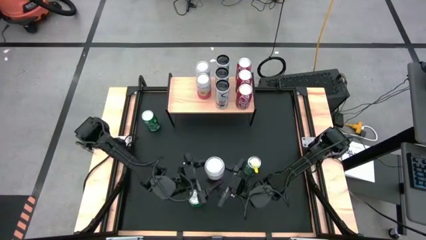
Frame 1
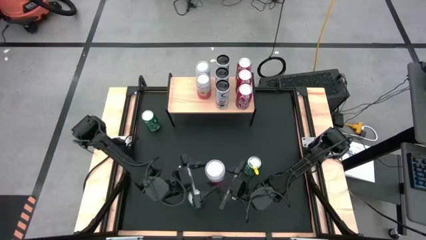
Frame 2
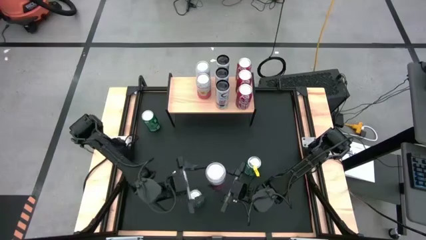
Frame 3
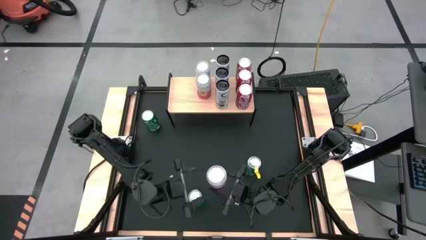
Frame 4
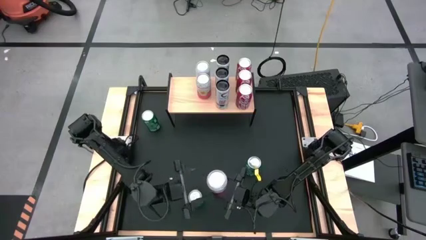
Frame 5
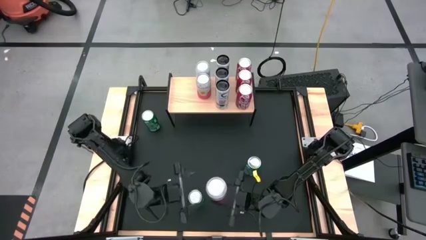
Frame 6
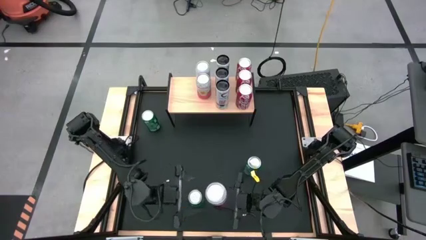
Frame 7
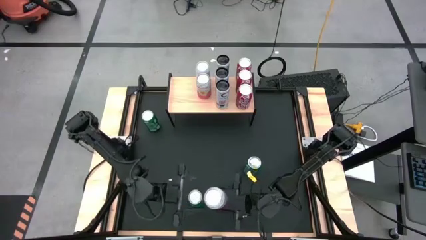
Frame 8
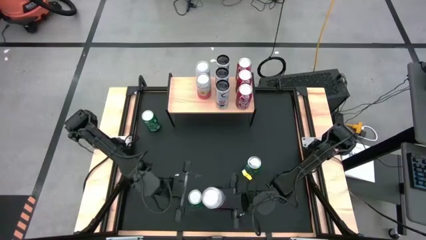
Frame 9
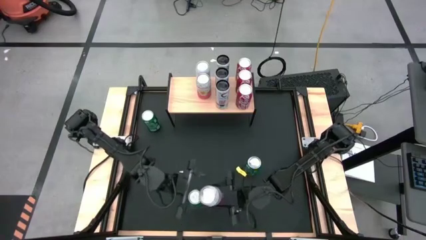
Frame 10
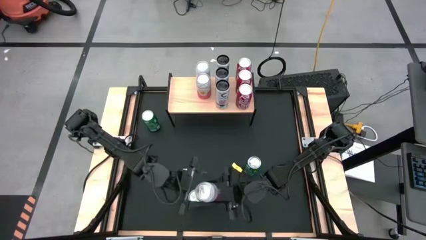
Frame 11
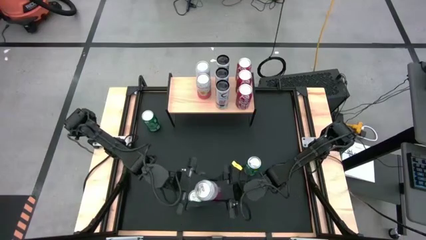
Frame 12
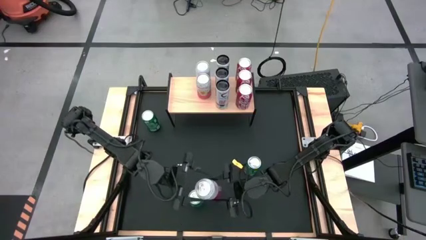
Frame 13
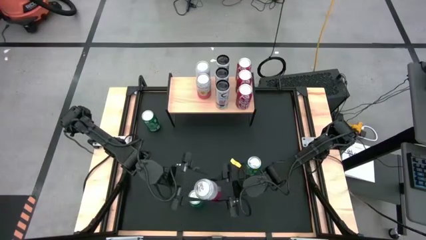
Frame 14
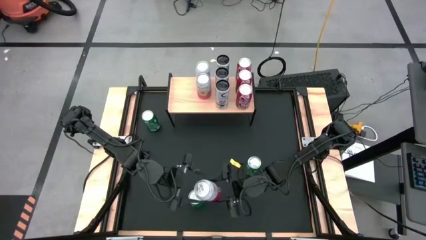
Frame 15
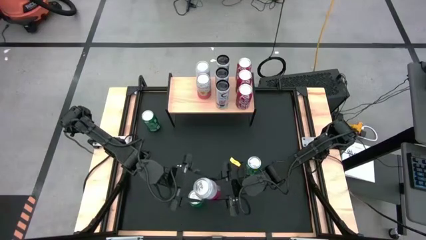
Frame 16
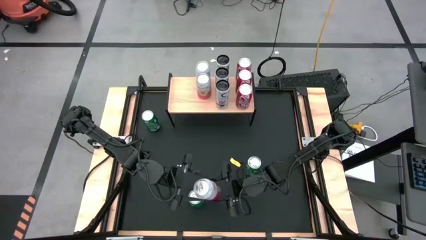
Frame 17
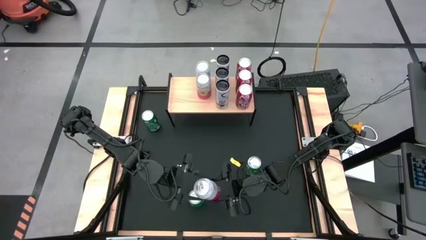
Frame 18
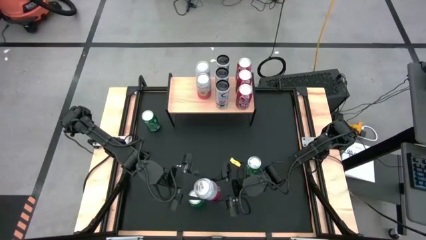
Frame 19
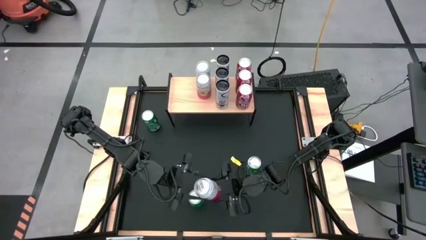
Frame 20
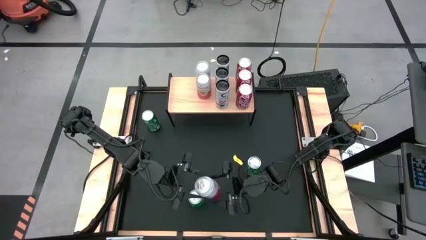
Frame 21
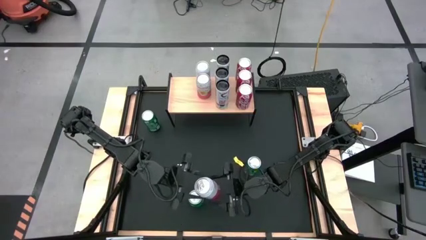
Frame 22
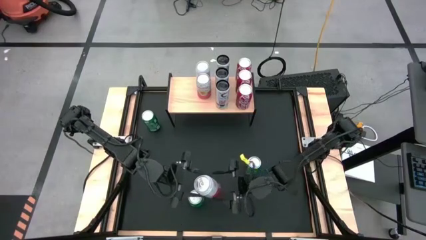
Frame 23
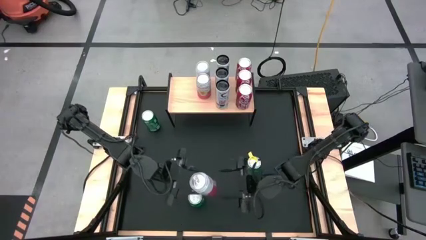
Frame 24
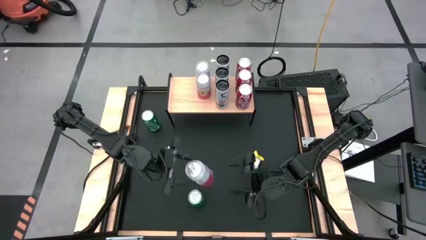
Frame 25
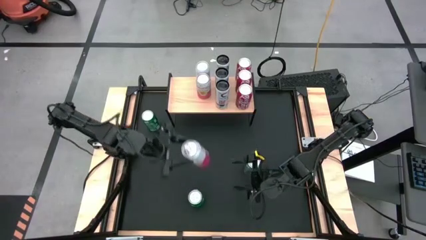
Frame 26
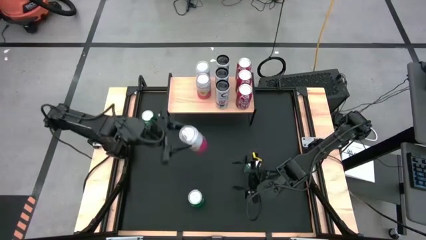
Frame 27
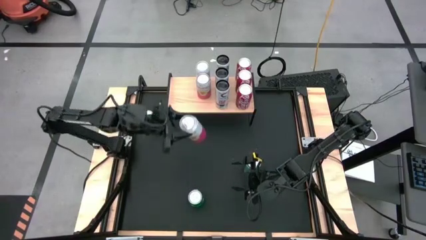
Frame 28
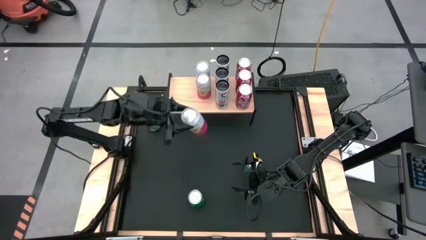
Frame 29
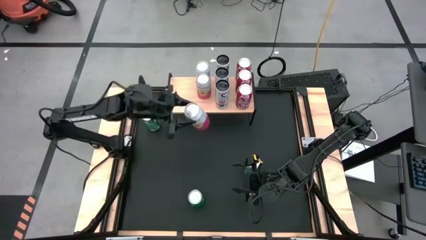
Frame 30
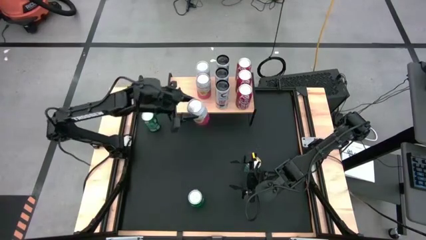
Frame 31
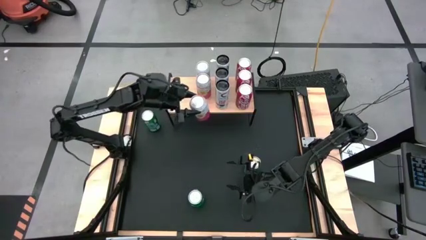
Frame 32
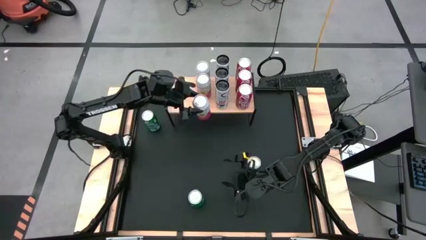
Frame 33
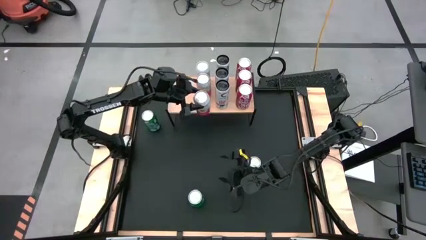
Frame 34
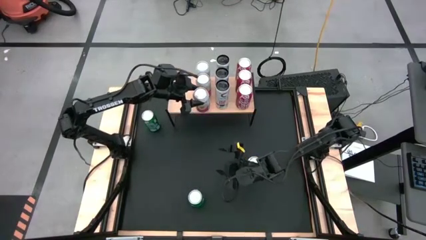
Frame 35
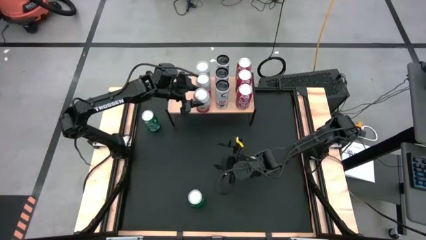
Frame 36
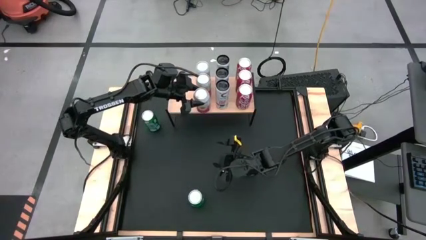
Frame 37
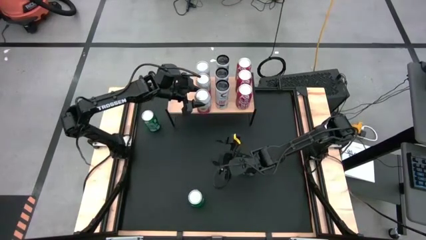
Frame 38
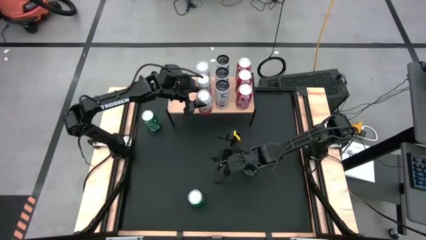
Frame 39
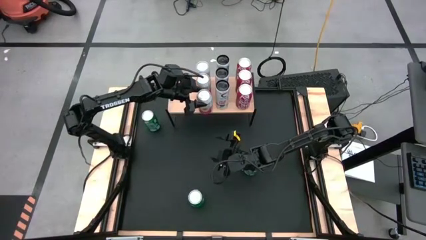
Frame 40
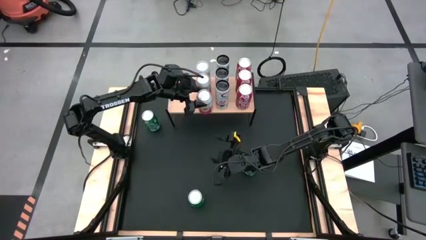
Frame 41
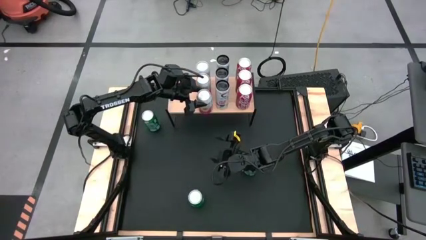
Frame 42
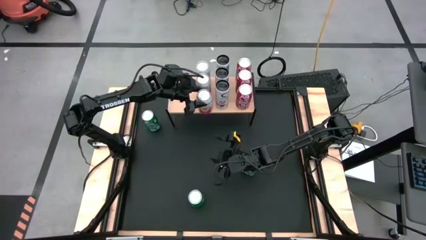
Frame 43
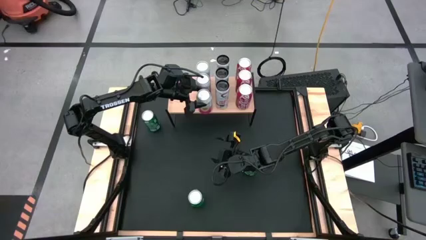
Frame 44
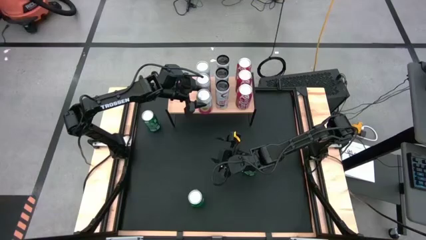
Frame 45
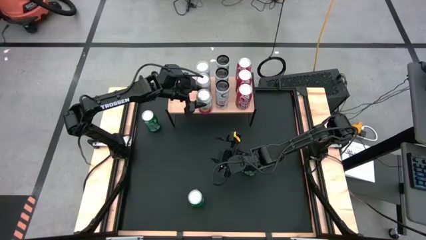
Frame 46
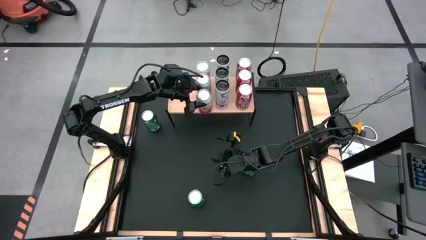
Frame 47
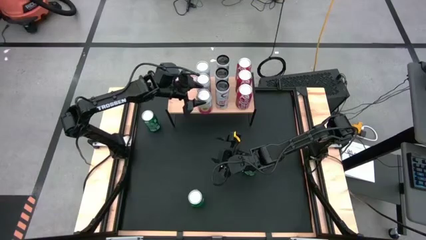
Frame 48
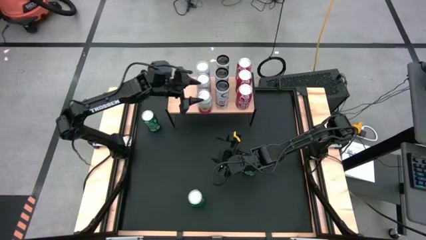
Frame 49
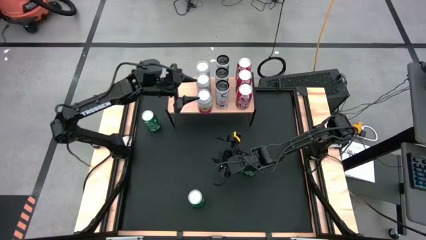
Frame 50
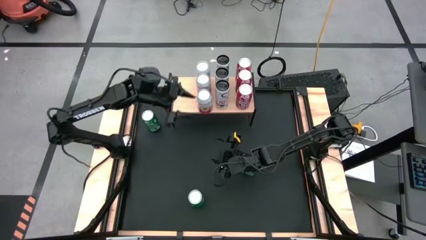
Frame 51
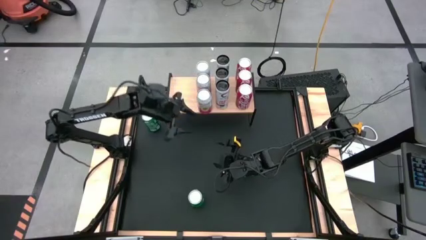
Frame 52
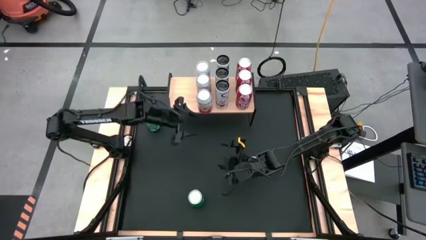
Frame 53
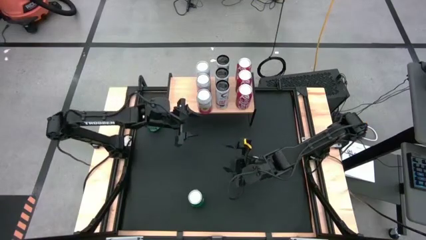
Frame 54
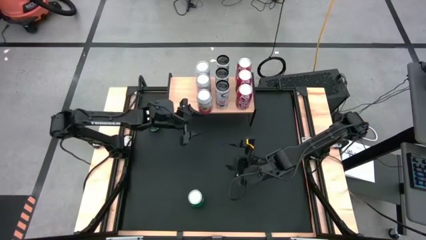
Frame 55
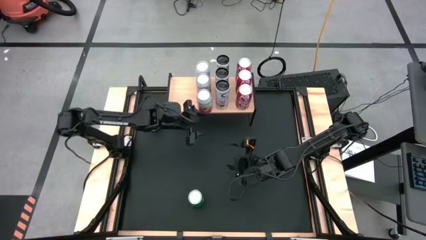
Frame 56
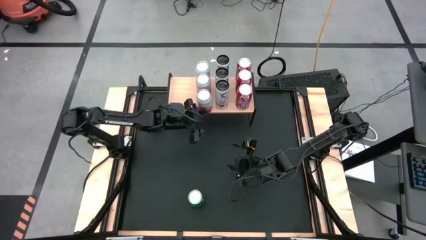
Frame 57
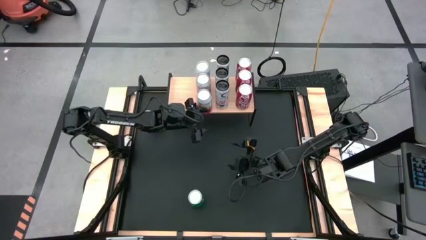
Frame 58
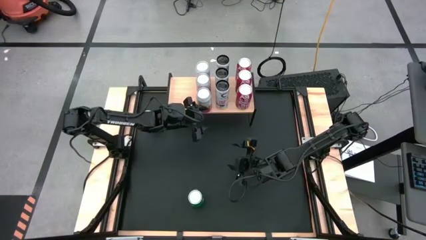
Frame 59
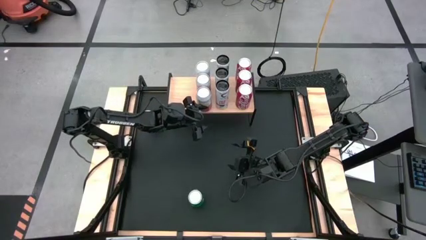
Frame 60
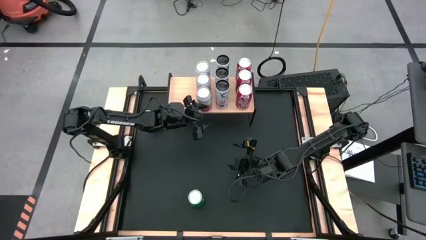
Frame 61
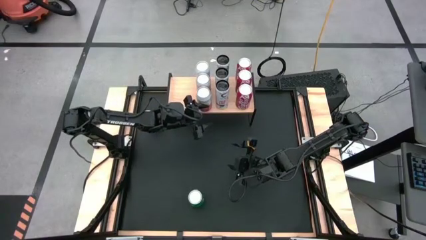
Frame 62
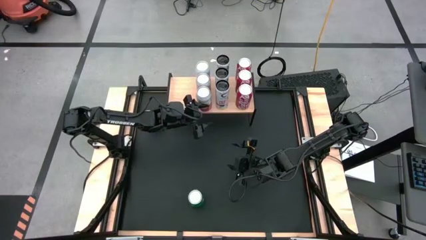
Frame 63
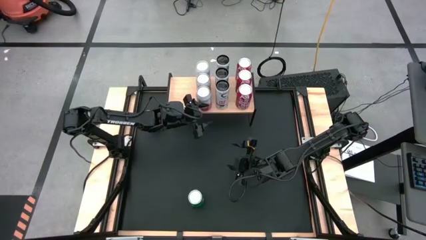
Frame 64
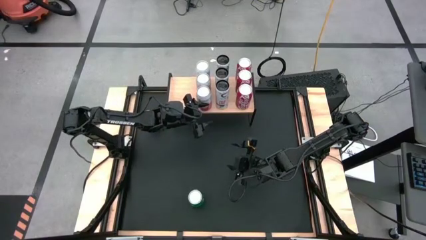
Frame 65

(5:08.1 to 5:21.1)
Task: Place canned beverage on shelf
Put the pink white soda can aligned with the other pink white soda cans on the shelf
